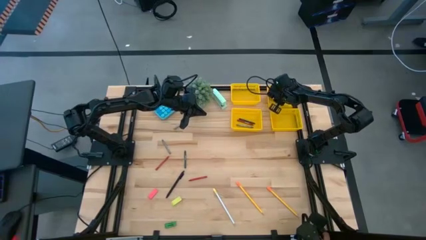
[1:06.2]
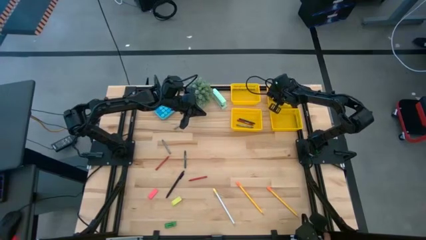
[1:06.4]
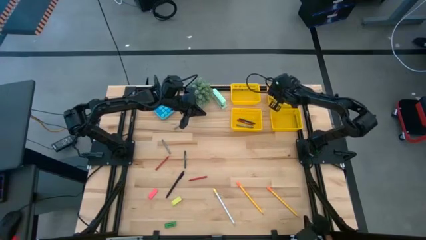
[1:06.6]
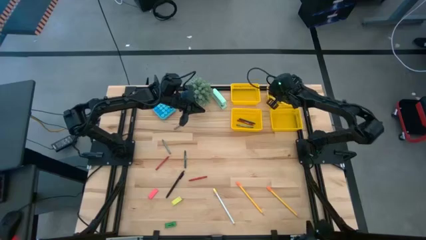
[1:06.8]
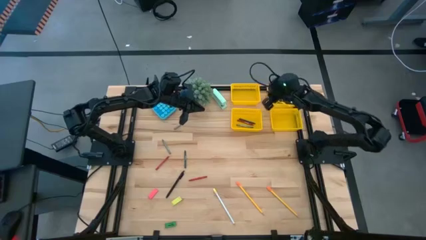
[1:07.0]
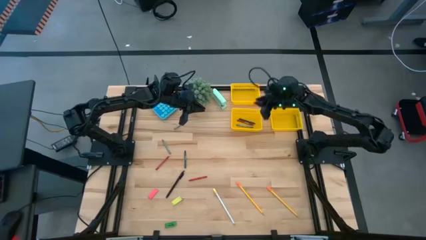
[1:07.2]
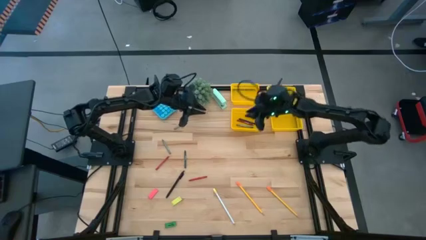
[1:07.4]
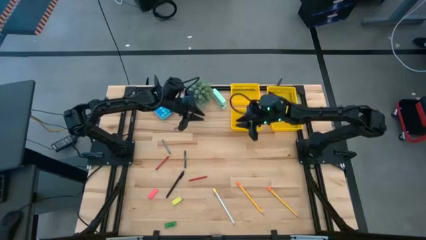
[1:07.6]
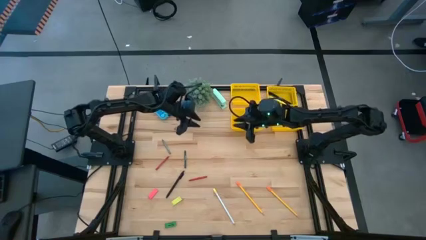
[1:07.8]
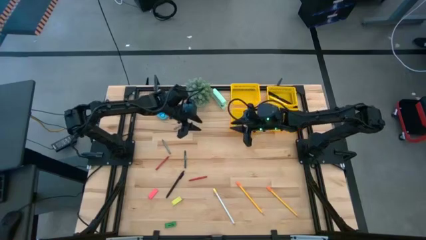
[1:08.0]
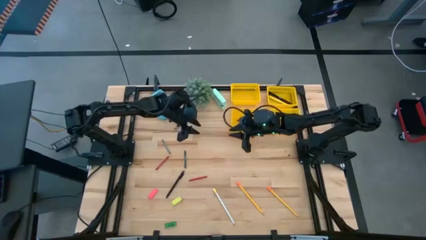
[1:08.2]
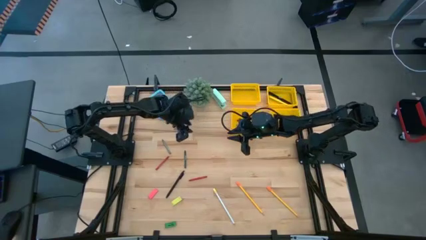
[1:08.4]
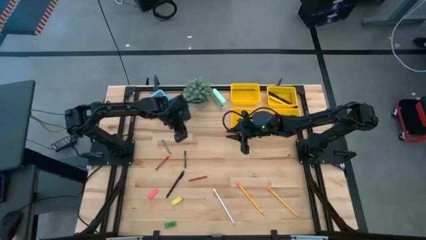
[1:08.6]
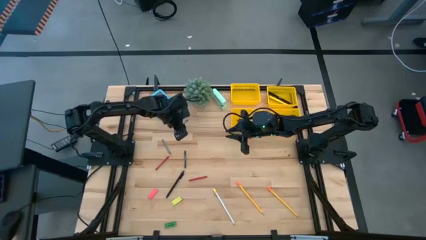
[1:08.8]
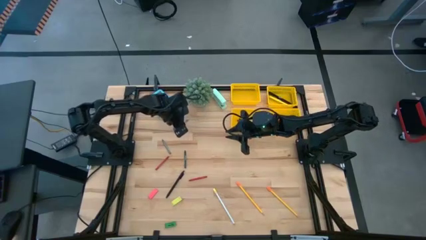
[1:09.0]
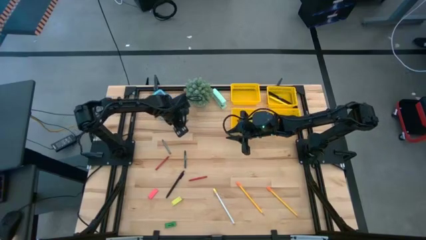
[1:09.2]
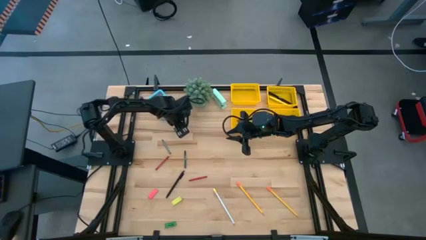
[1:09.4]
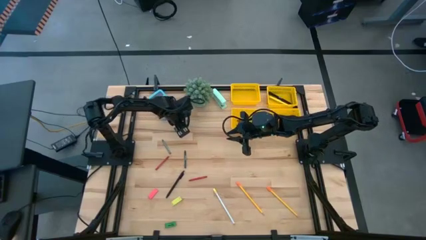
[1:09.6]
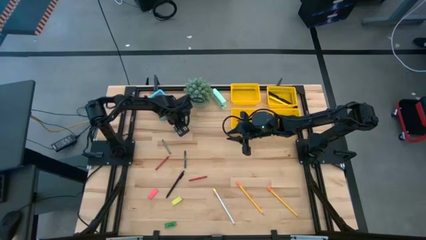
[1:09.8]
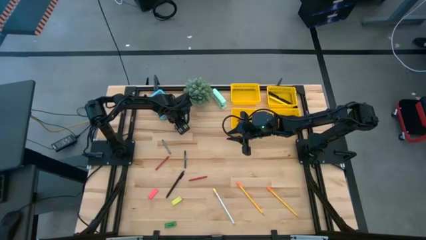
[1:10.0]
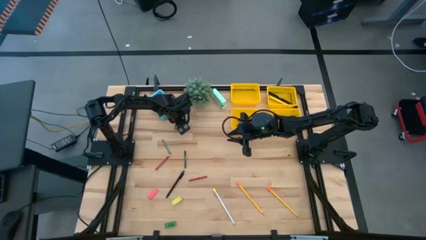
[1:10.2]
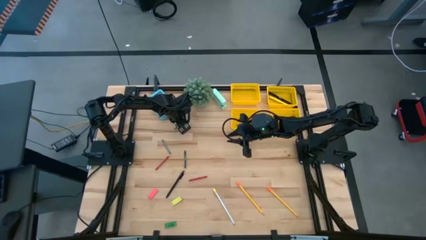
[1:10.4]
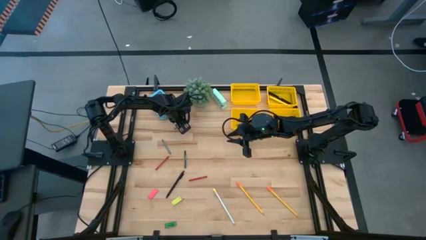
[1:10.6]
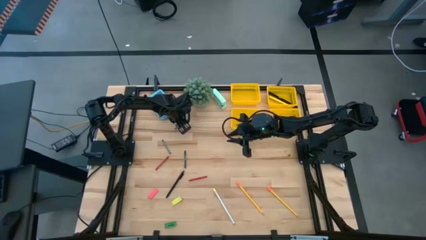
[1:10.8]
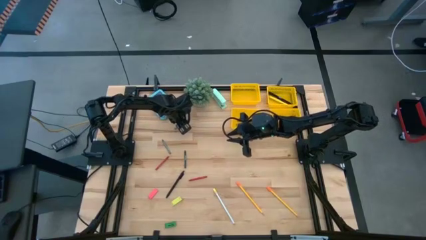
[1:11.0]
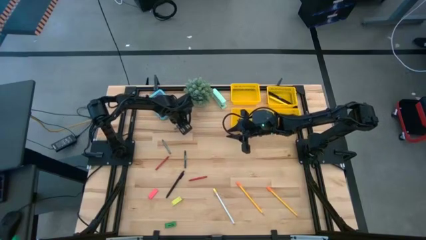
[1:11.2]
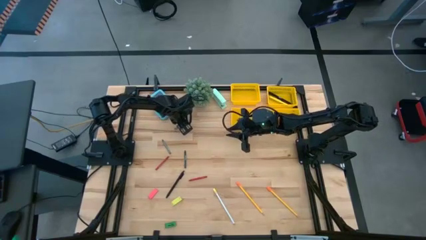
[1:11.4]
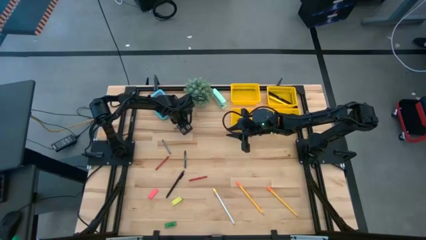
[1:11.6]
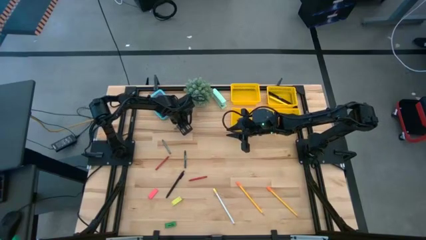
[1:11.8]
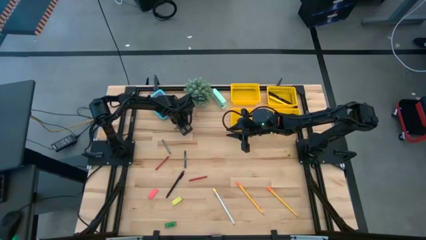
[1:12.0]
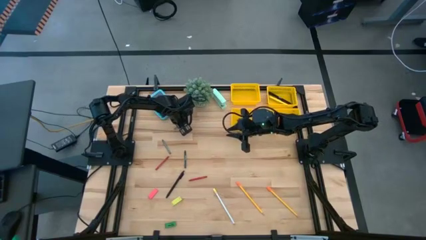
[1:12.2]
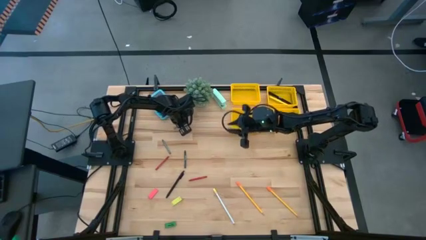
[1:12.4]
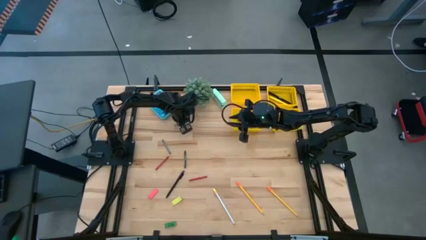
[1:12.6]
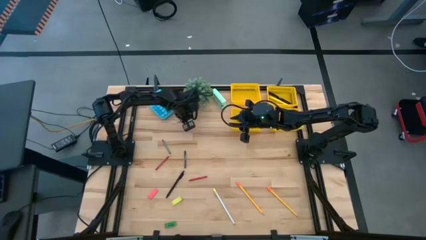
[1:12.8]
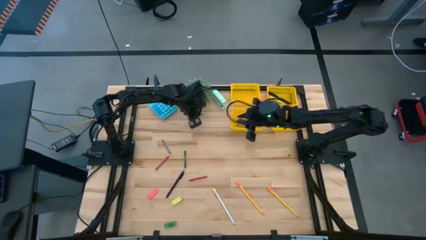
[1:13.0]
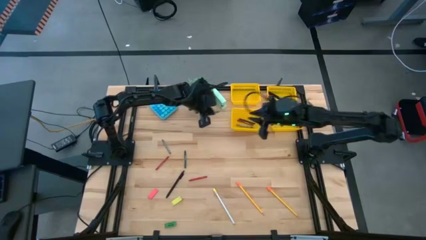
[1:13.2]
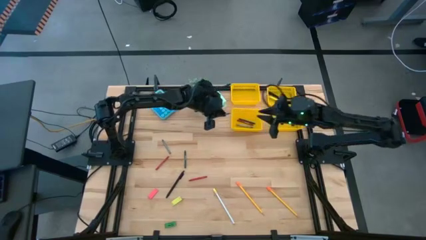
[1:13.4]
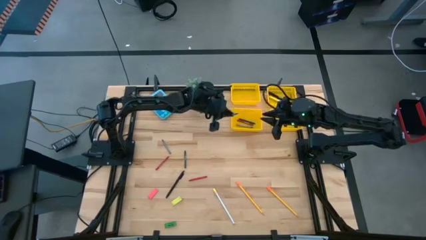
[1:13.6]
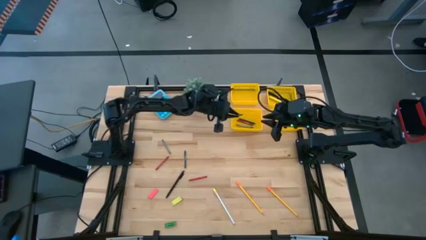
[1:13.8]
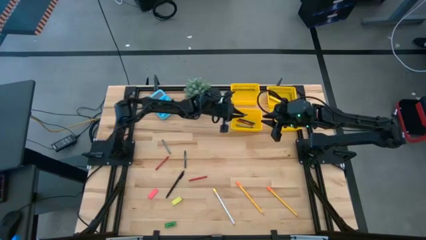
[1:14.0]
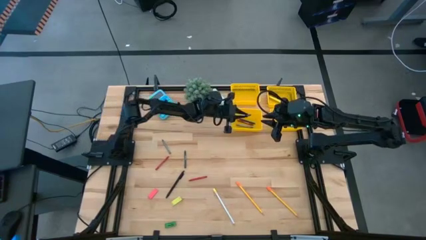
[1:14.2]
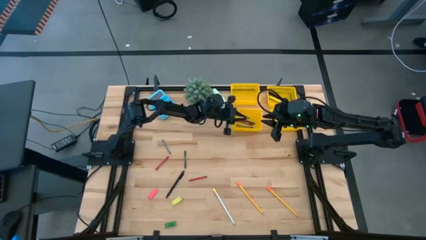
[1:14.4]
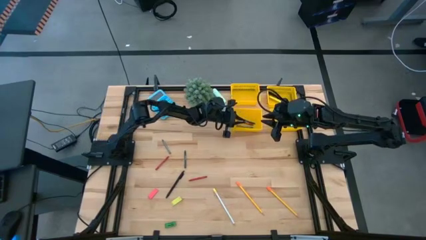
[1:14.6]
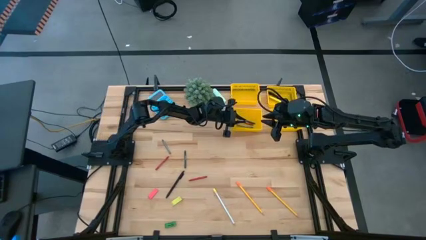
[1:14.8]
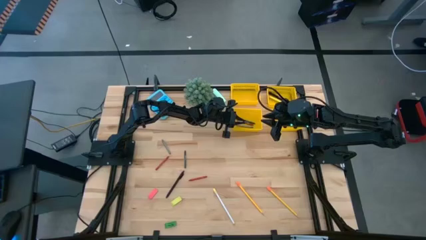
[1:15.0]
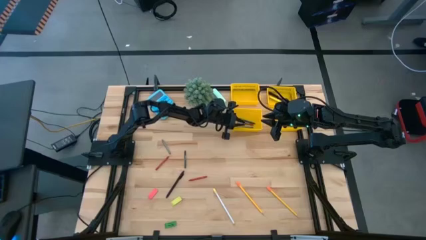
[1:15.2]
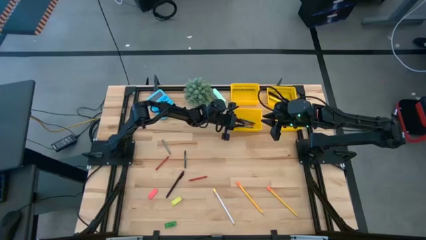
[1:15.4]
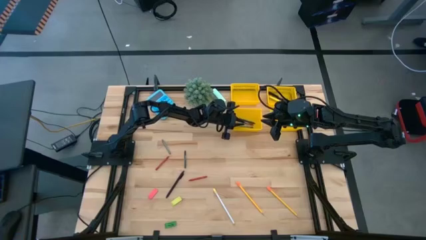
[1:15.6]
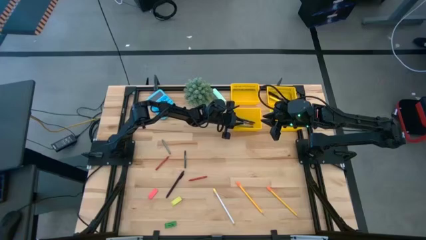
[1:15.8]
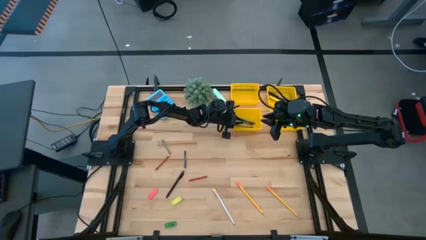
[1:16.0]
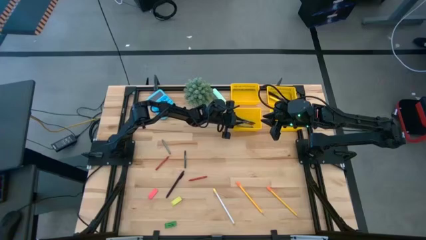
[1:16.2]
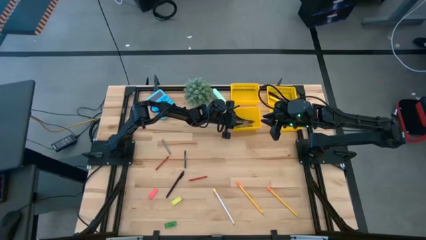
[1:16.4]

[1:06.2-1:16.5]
Task: Sort crayons/erasers/pens/pencils in bins
Put the top gray crayon into the bottom left yellow bin

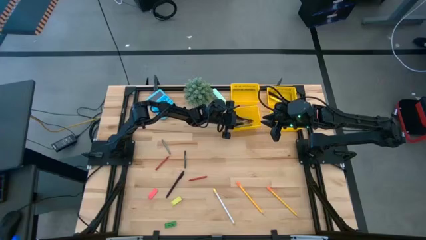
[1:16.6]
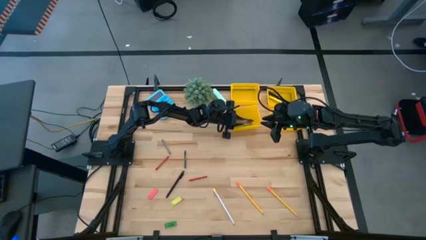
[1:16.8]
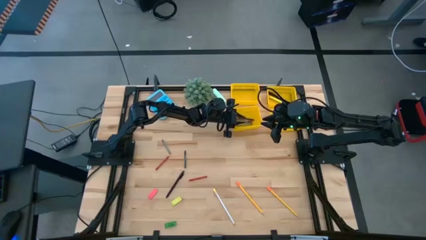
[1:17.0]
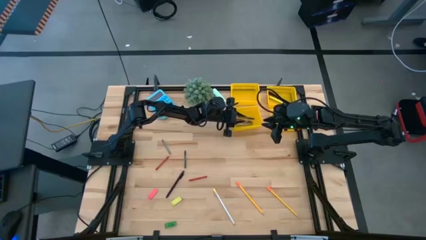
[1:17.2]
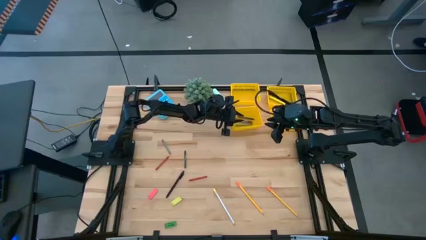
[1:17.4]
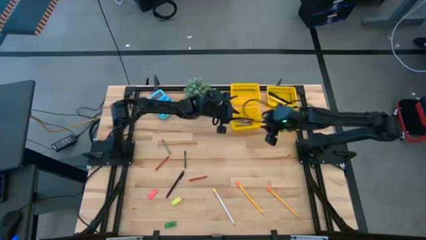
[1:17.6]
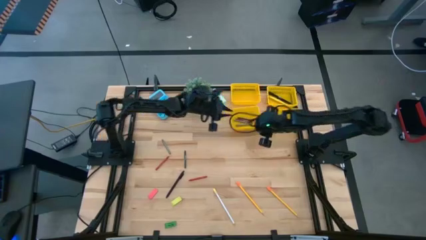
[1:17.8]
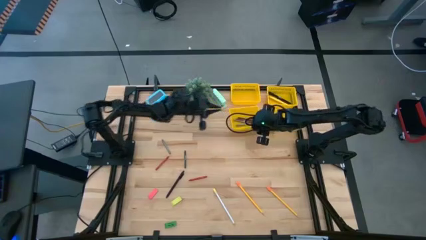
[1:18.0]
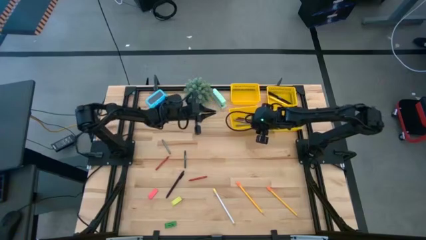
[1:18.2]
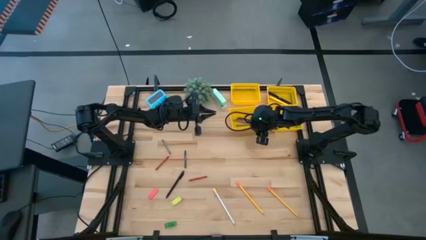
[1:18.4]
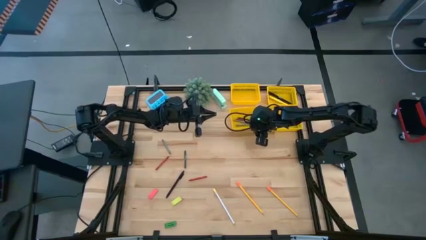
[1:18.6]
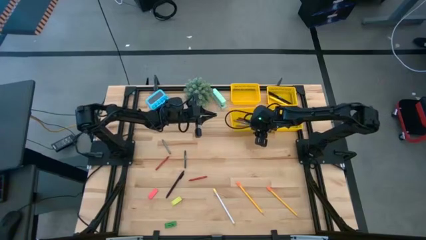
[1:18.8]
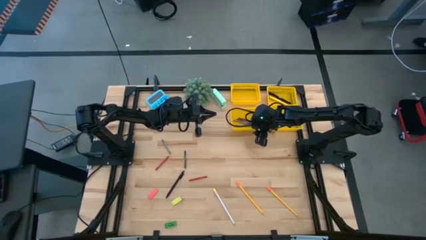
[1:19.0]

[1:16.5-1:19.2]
Adjust the bottom left yellow bin
